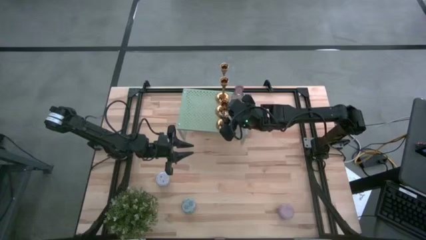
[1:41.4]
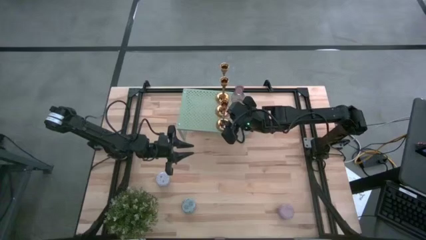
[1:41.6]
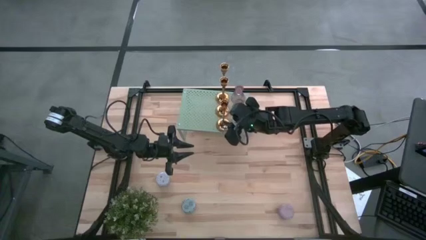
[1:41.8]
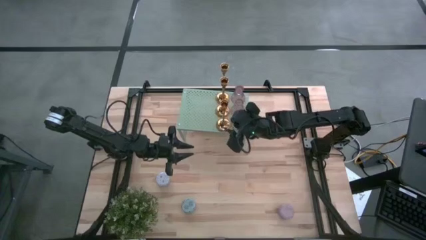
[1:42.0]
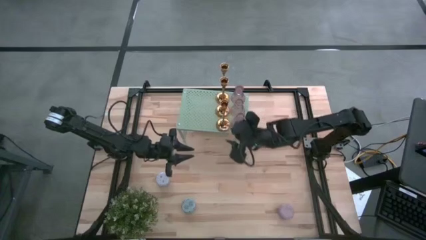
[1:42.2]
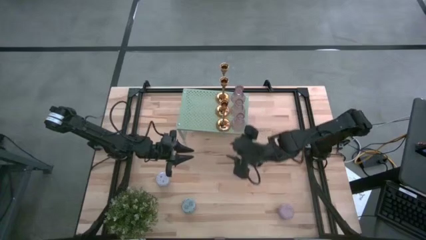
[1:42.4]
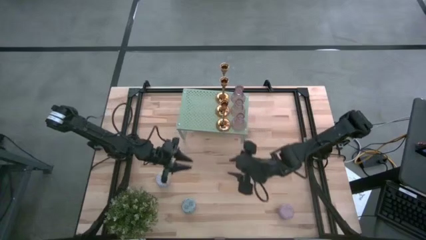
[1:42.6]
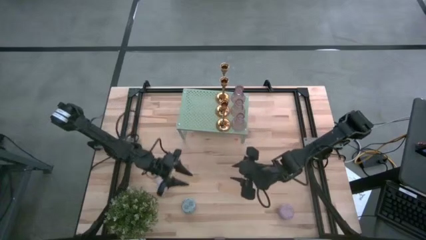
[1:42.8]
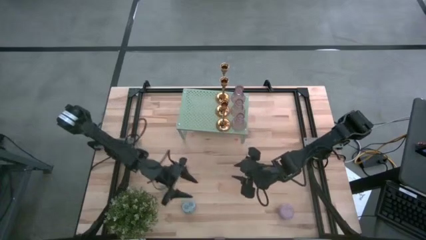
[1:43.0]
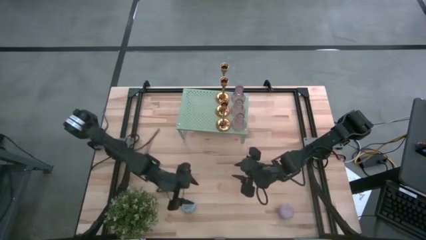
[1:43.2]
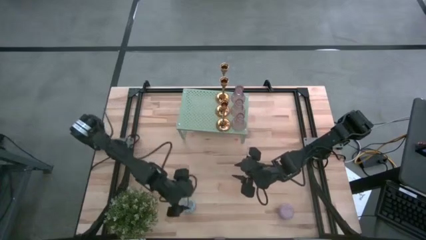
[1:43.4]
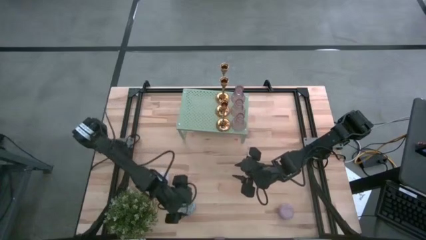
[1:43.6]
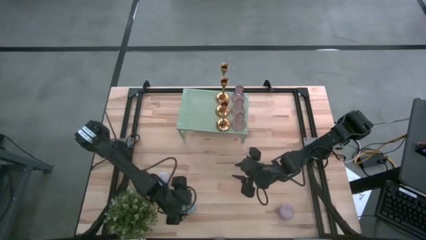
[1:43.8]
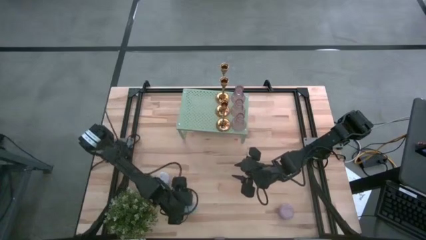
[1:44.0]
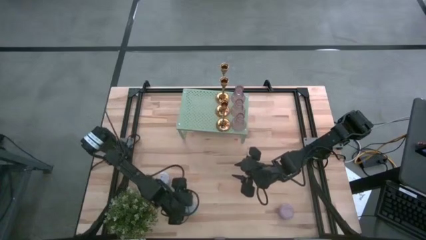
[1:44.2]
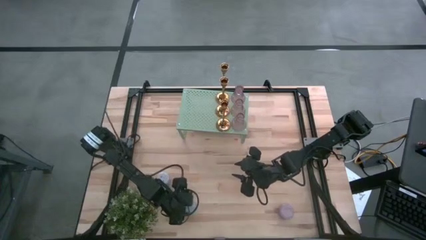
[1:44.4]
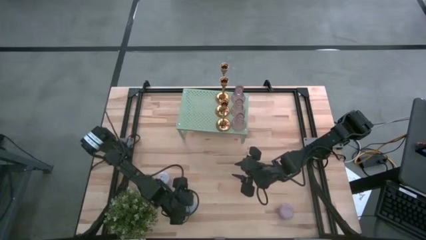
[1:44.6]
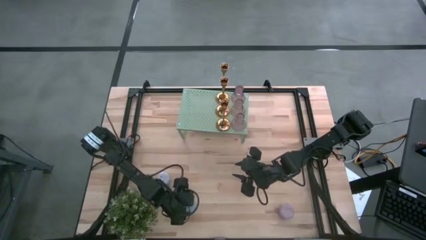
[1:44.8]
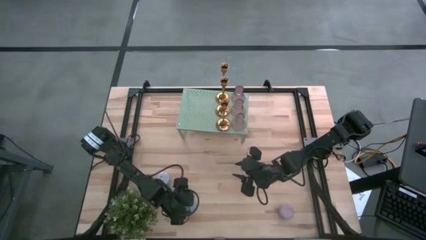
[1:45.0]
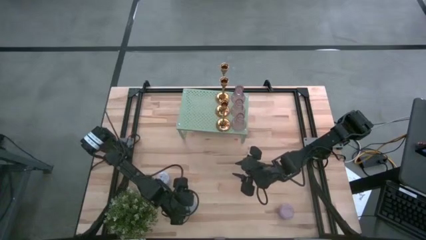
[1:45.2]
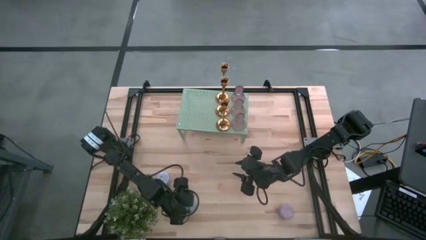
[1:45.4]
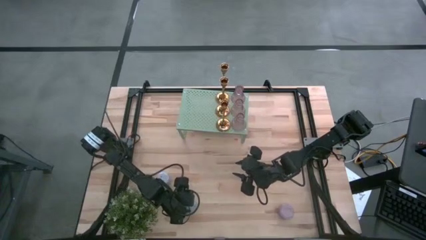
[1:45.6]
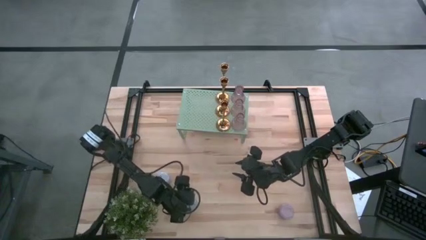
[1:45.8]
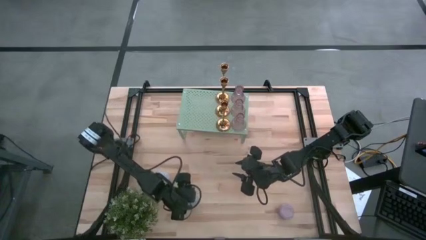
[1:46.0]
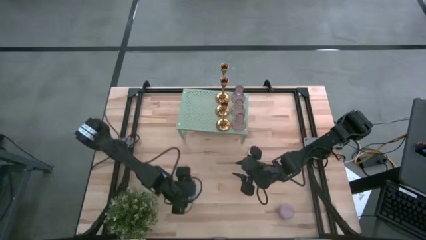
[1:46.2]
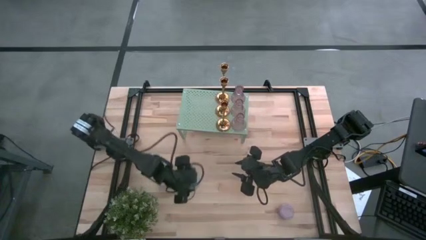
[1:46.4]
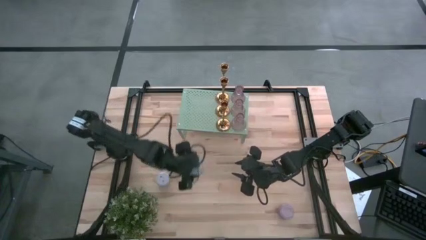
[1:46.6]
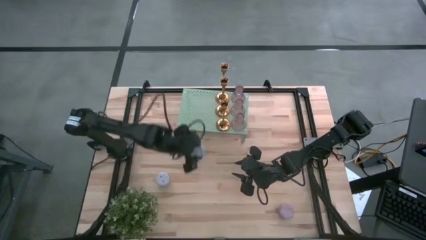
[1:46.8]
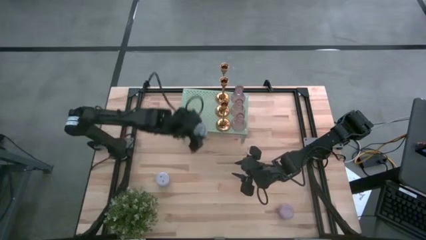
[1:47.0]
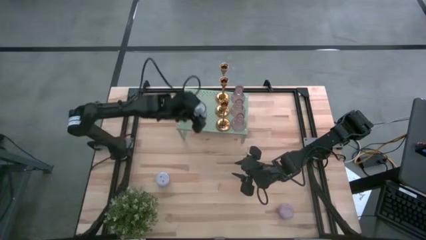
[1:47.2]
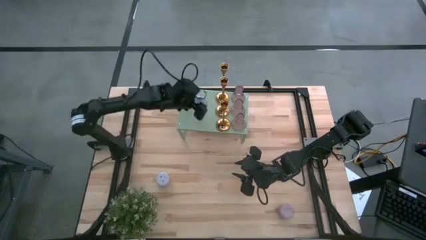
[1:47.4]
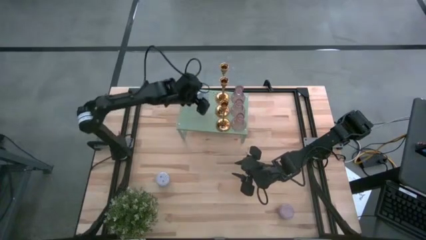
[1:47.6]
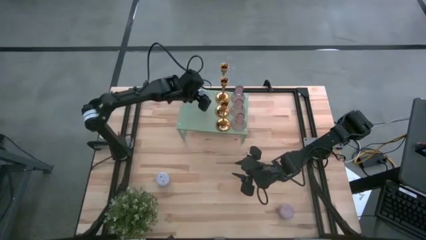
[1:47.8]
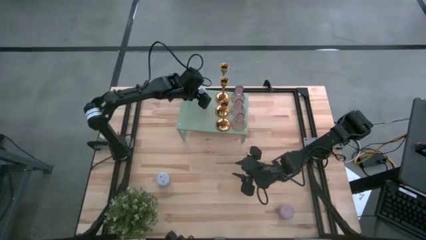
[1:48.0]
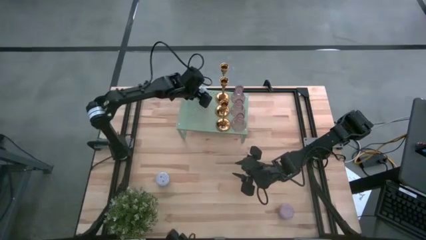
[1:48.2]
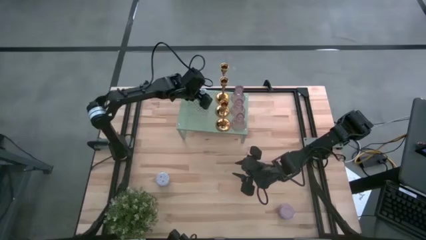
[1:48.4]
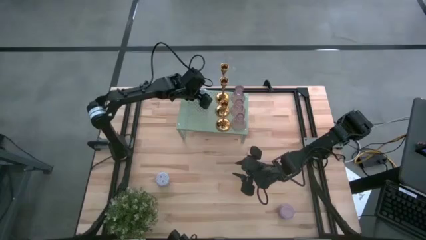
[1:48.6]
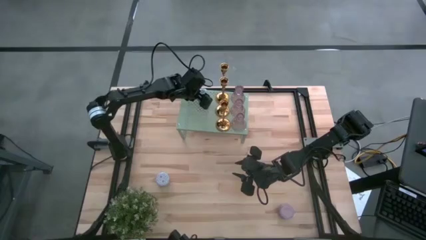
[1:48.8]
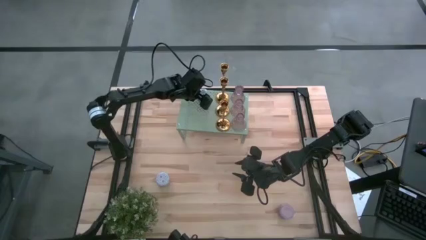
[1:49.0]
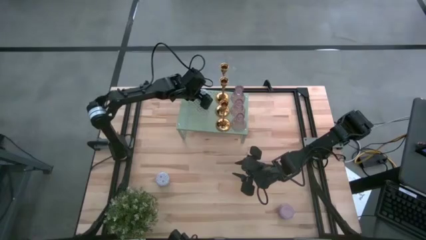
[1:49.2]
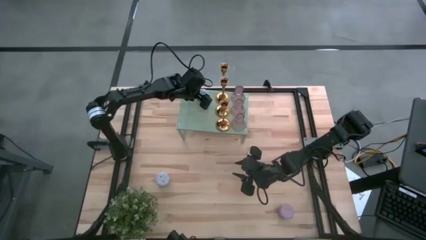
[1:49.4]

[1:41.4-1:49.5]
Task: Pick & Place candle stick holders
Put the green scented candle on the shelf

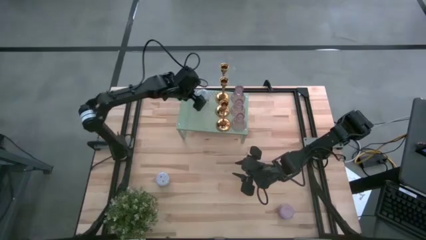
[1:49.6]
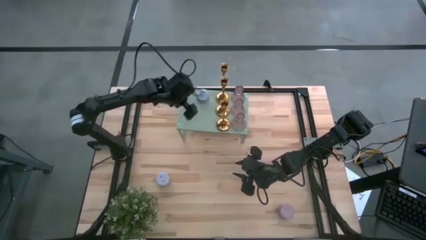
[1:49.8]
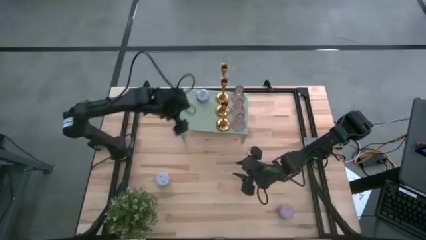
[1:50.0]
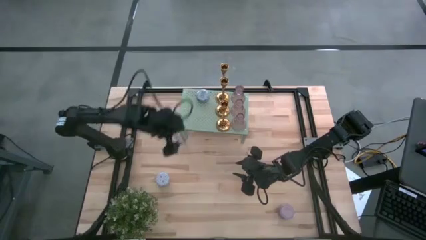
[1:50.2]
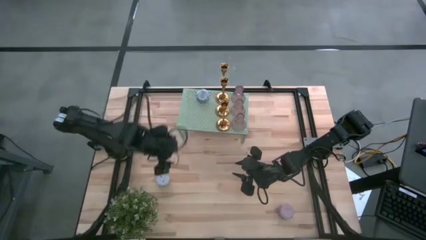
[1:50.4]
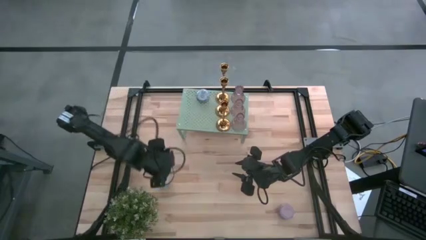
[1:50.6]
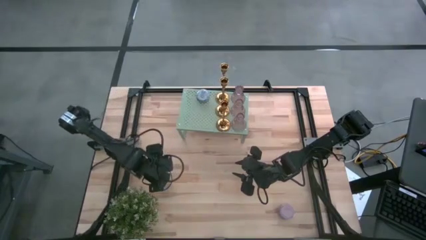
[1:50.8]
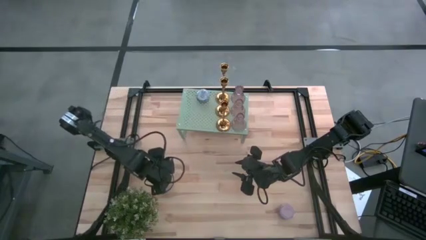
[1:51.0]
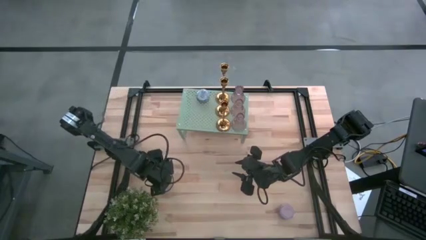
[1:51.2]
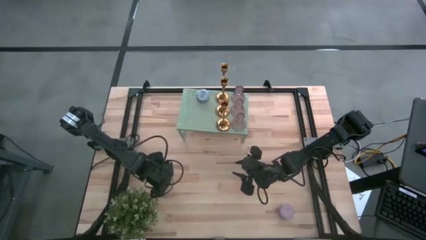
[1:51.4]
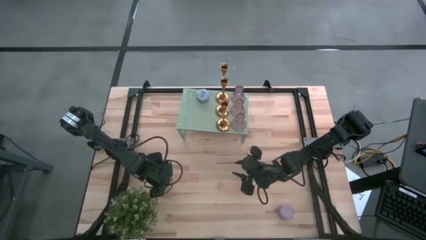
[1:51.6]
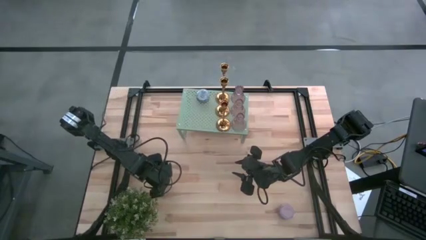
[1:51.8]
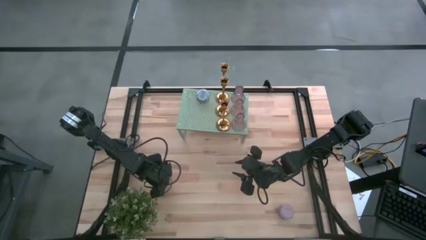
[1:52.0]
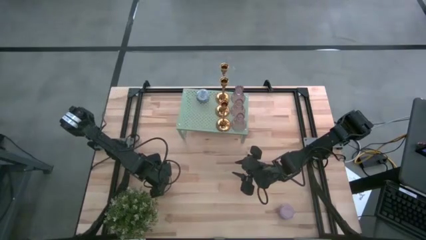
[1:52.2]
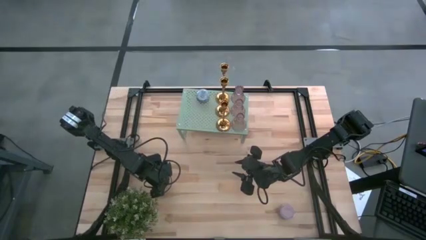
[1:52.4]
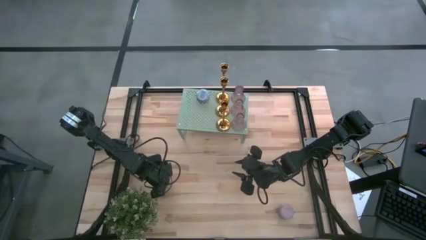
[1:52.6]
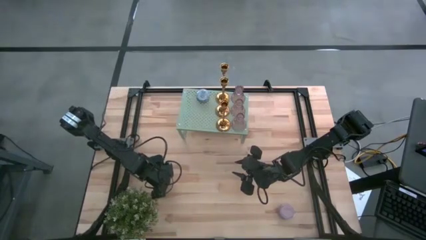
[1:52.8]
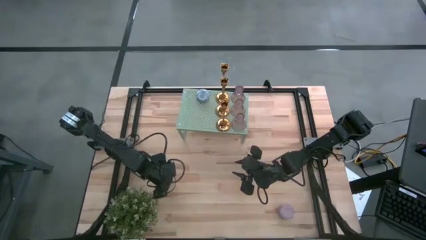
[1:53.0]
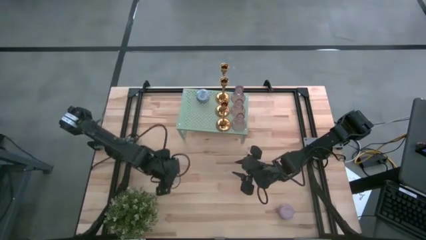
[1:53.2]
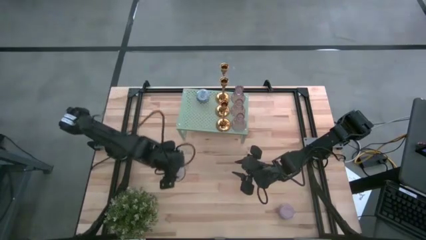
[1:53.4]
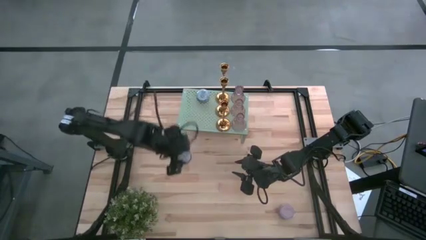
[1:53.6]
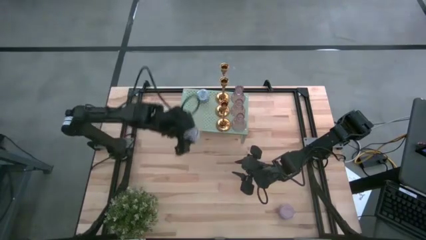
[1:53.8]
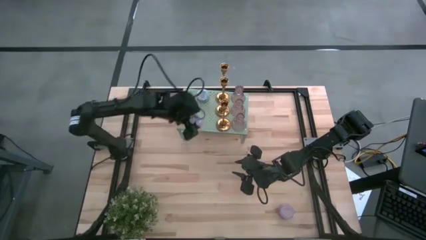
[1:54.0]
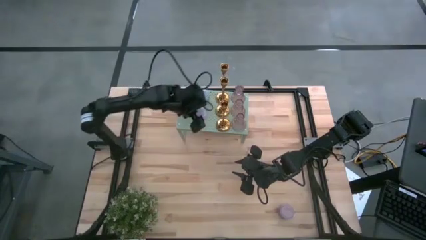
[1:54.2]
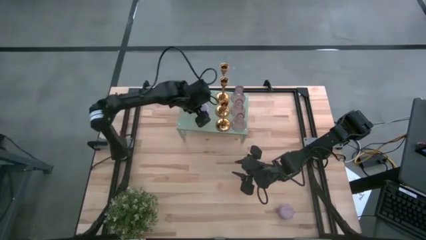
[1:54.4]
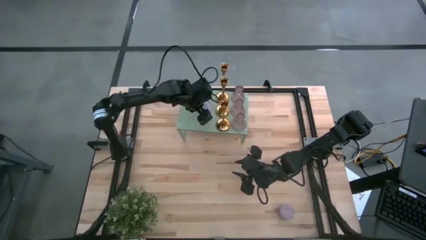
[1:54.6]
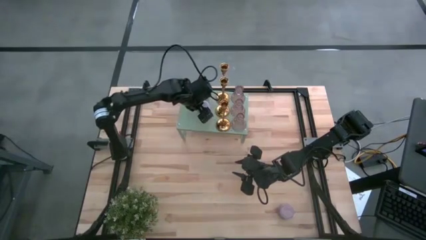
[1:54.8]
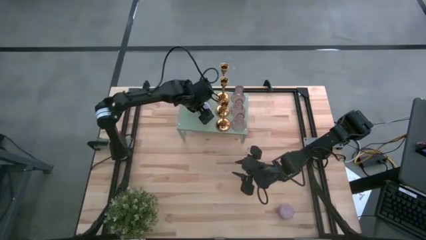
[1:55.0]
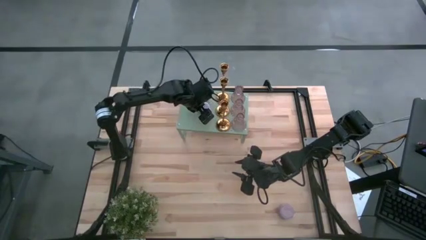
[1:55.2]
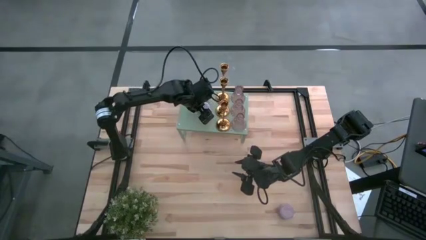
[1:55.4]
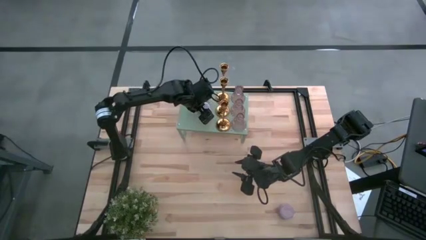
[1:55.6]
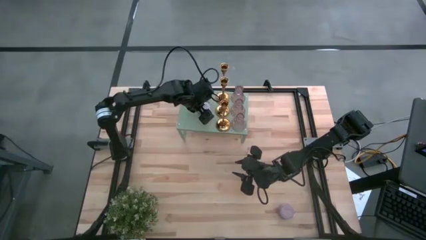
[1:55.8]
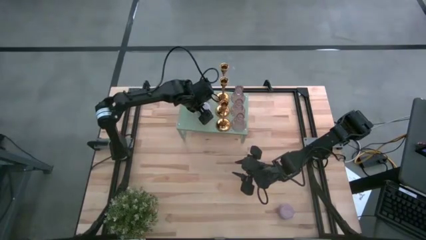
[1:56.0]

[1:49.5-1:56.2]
Put the white scented candle on the shelf
